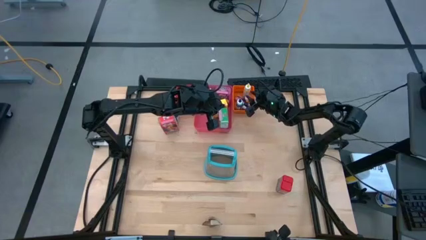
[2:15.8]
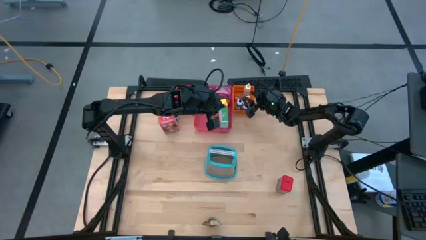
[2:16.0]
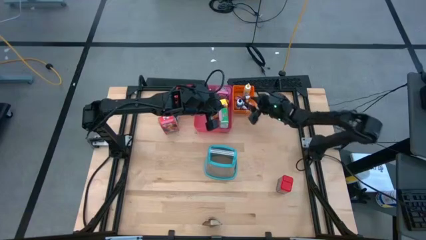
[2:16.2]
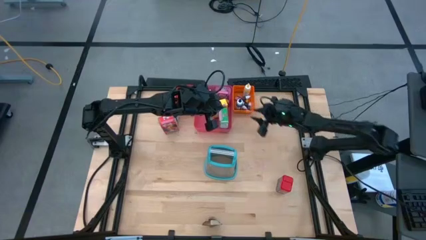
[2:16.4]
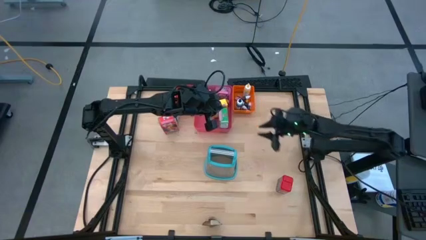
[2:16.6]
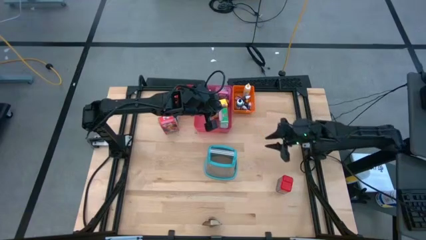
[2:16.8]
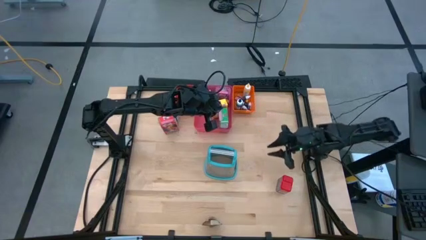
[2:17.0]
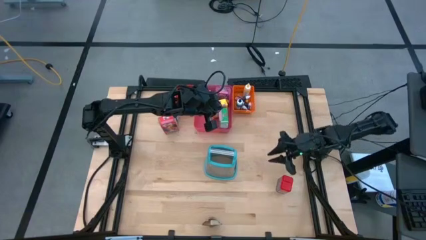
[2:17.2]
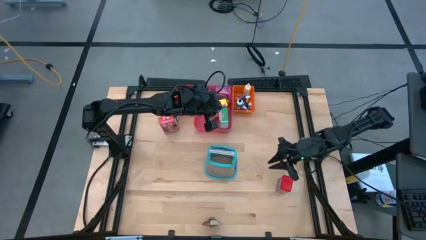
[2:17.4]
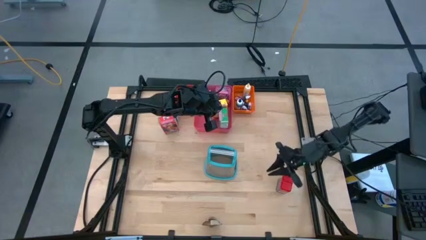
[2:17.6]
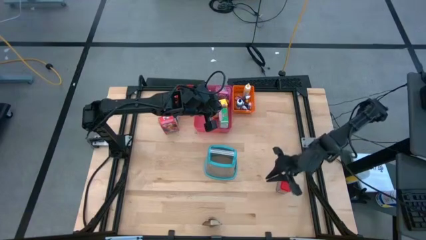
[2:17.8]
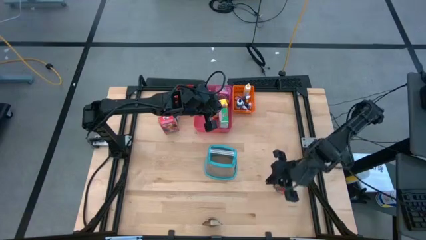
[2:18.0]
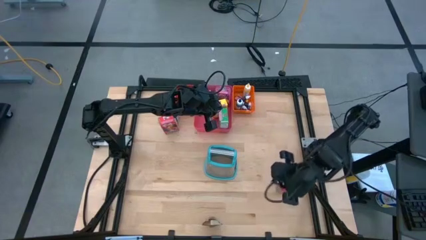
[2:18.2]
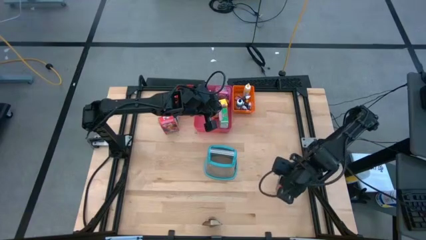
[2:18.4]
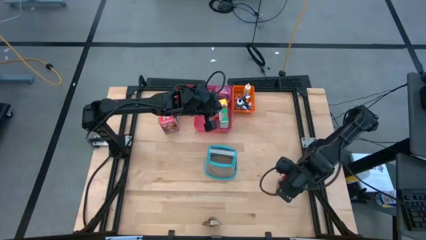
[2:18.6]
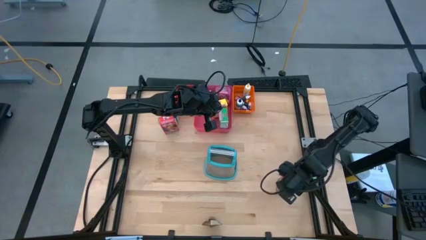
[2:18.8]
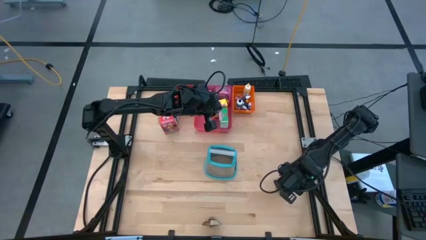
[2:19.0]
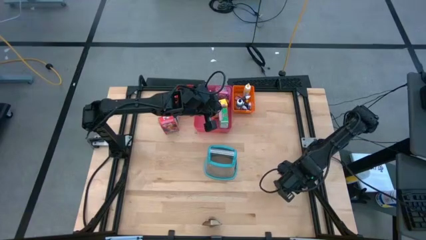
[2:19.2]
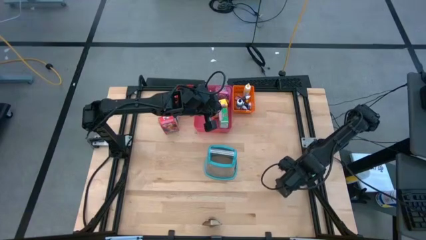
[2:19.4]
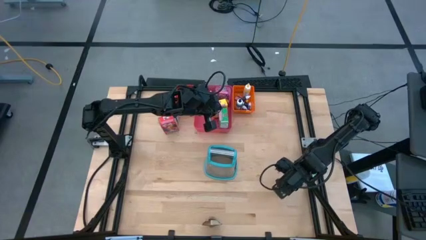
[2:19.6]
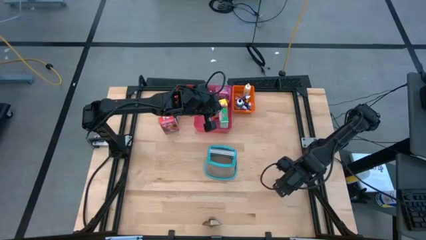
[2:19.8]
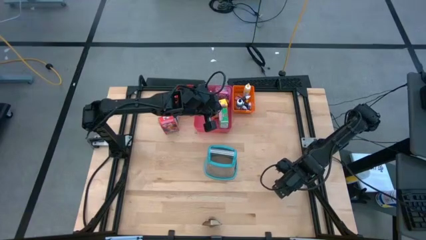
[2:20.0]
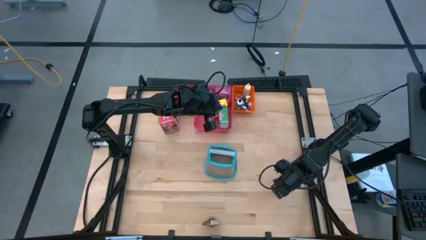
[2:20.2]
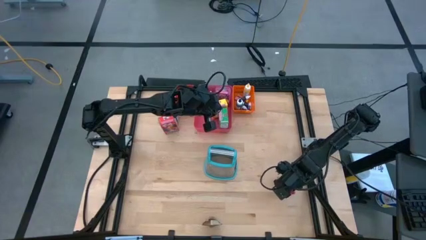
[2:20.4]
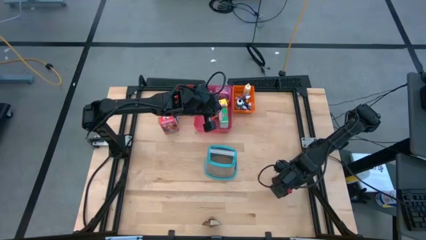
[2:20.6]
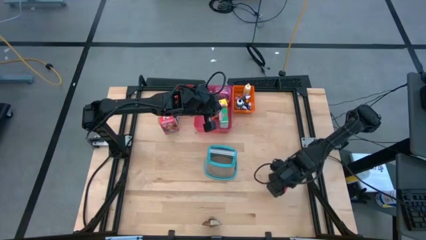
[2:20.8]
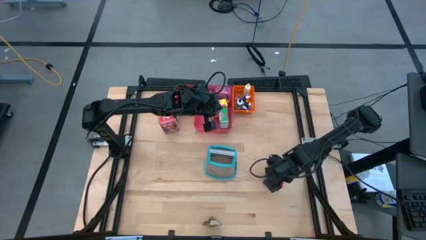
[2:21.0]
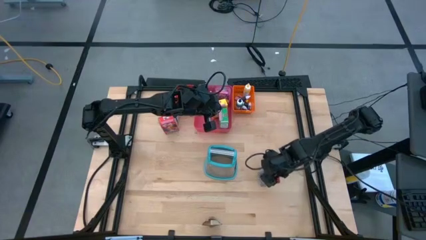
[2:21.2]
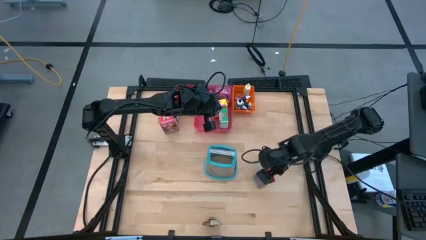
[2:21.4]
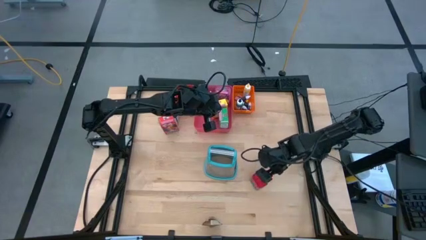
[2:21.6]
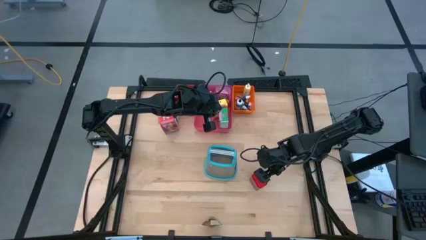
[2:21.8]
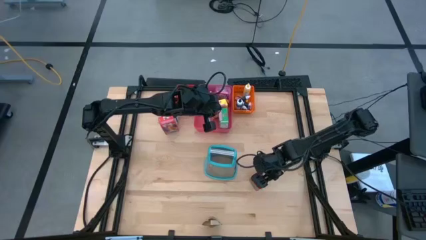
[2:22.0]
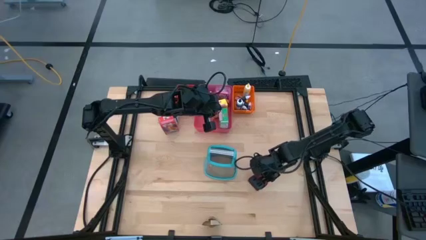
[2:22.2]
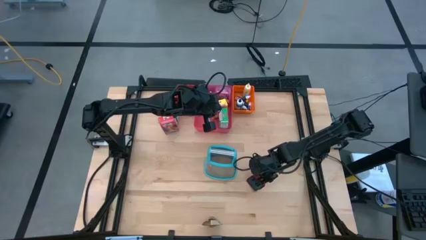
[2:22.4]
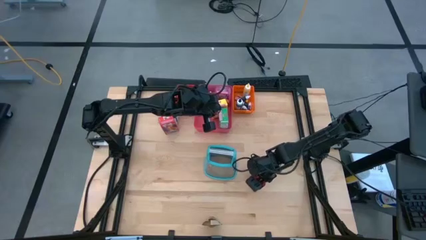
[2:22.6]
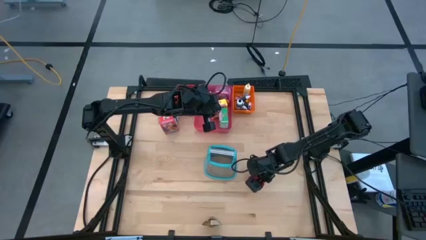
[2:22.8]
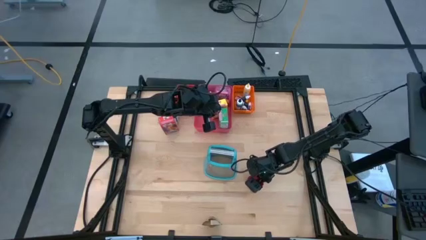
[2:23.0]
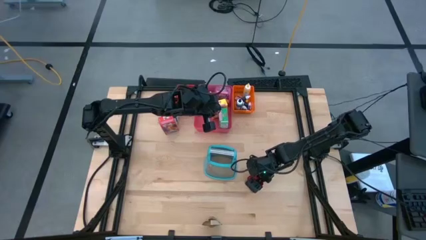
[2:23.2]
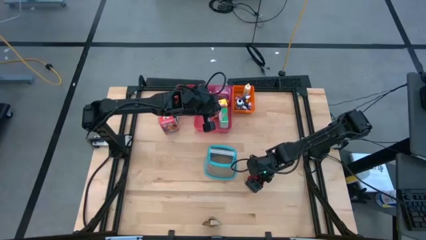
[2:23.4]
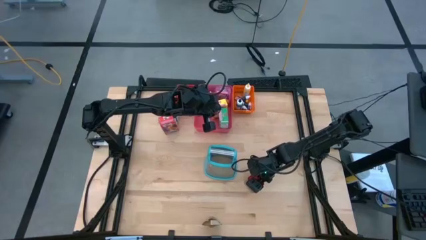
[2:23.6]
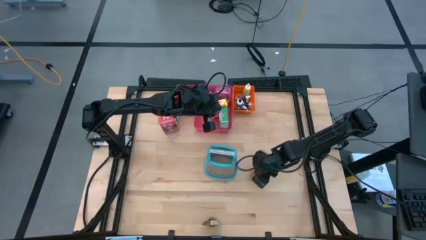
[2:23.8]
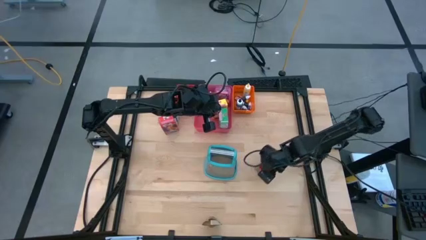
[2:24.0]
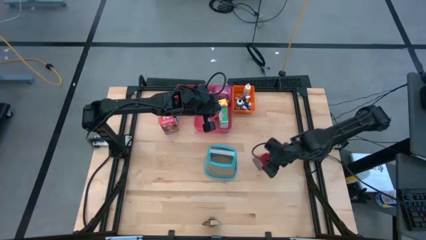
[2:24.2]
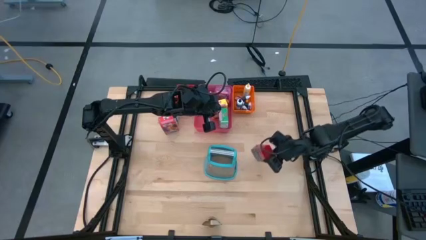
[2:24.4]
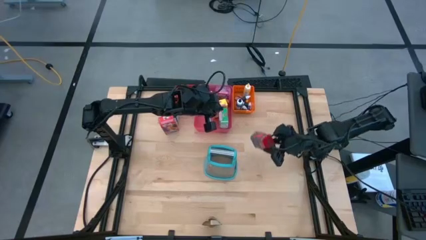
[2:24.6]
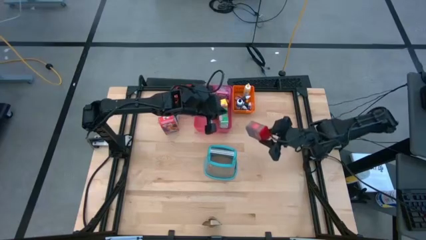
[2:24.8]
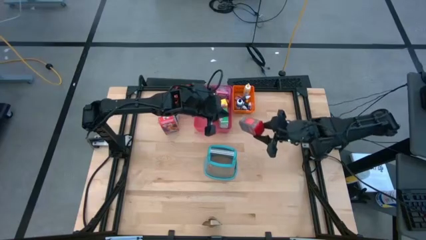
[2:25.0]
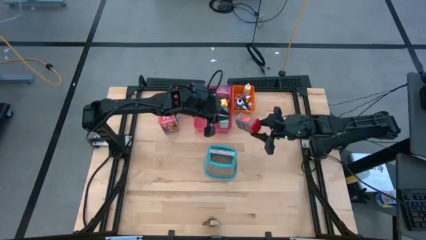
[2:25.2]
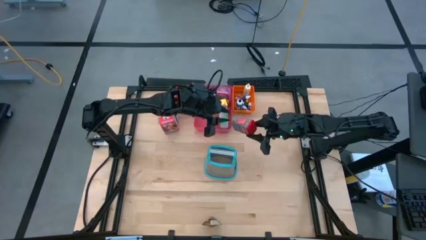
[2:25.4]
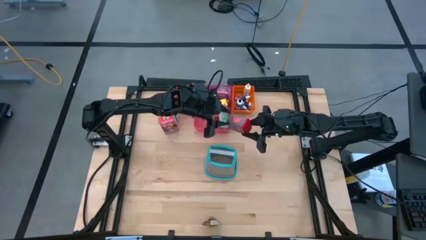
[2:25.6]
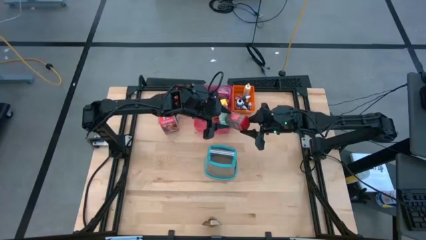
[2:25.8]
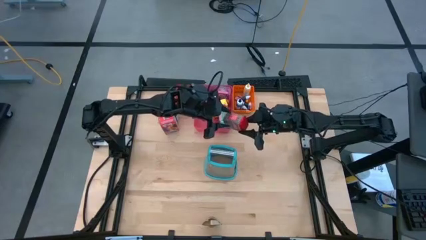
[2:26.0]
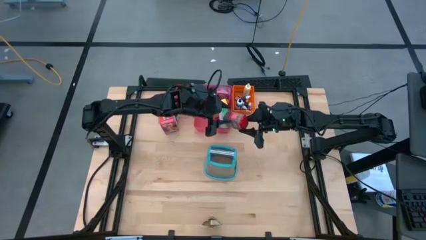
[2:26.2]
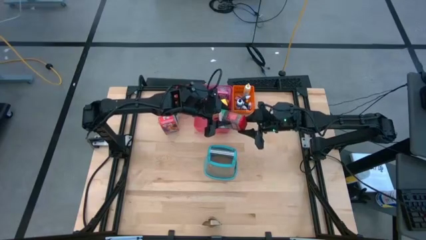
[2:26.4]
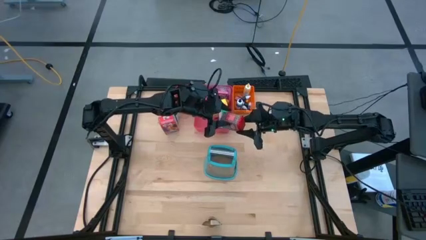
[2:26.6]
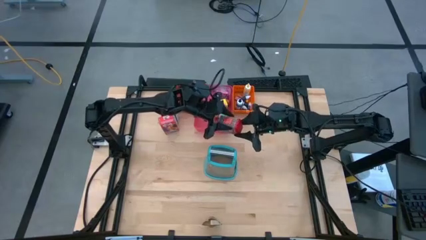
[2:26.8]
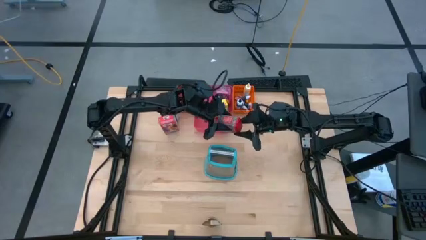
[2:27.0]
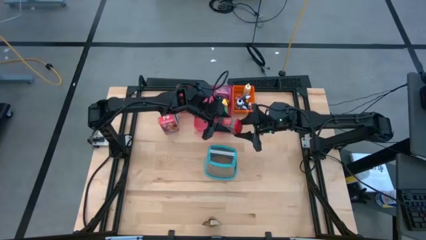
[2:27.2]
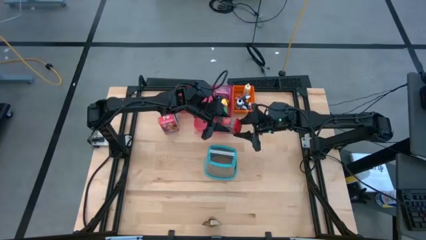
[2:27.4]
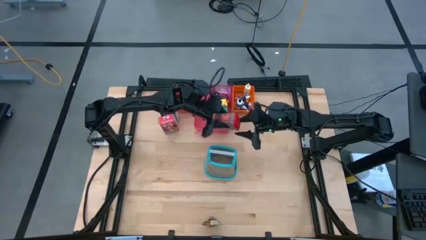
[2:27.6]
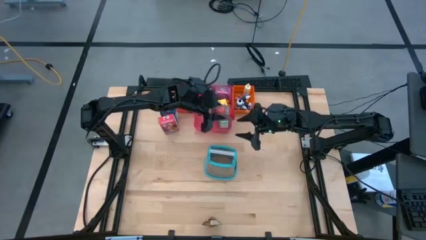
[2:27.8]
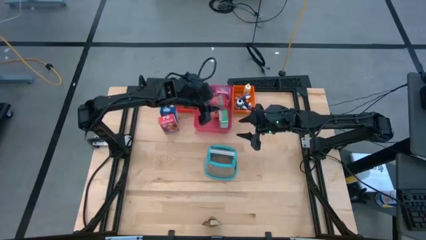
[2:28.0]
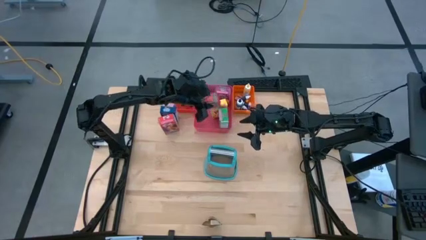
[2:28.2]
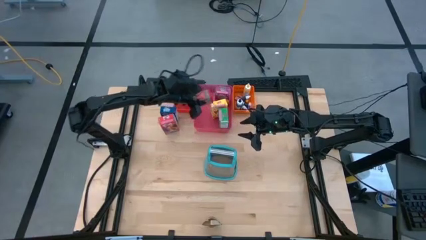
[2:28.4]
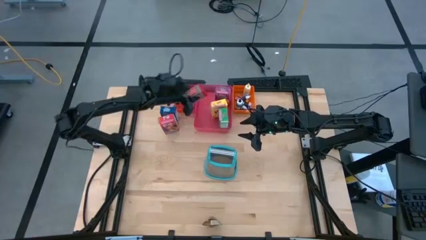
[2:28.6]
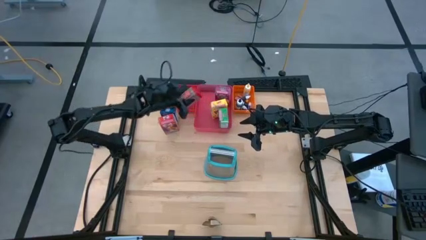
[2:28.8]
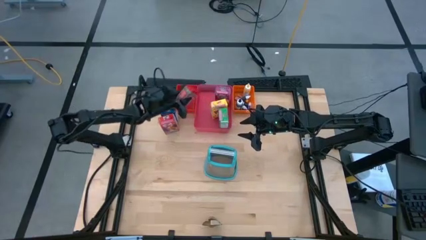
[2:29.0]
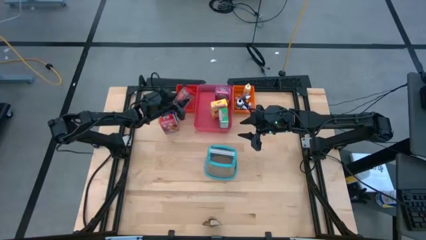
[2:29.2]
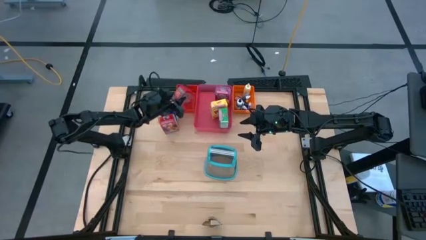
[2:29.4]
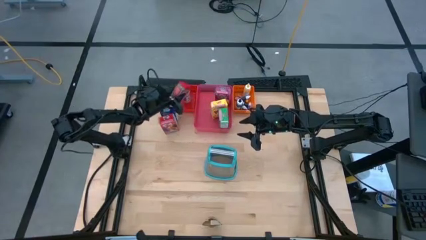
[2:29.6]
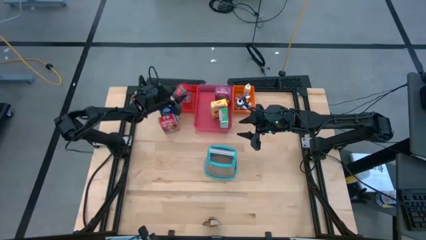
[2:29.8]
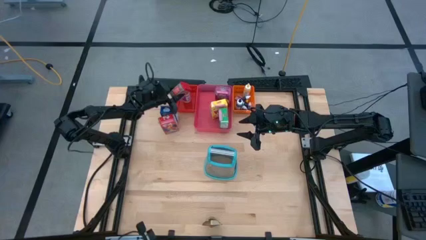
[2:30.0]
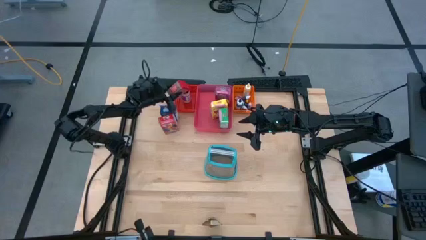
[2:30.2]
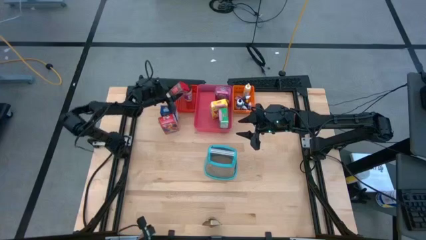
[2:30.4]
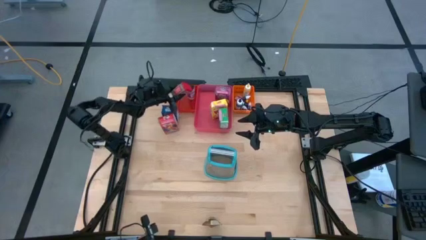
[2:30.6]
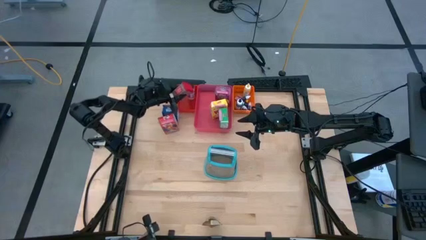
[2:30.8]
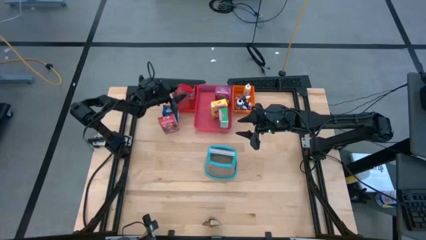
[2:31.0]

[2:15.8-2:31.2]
Task: Pick & Place Kitchen Items
Put the red seasoning can into the red bin
